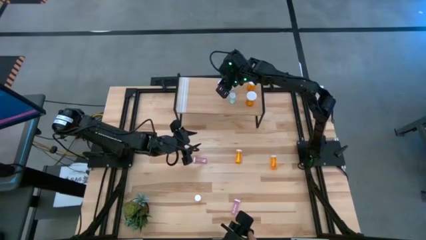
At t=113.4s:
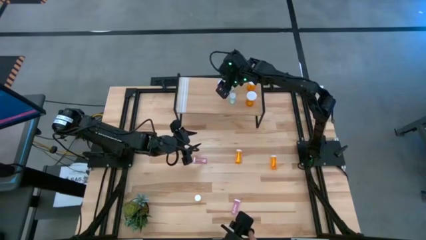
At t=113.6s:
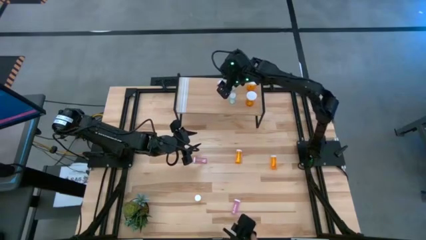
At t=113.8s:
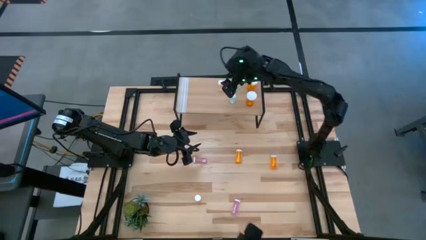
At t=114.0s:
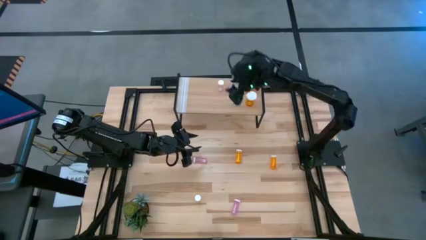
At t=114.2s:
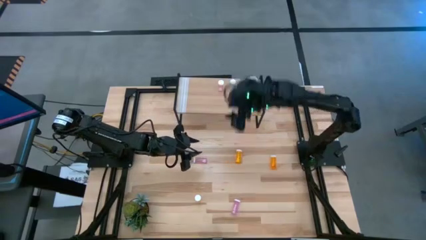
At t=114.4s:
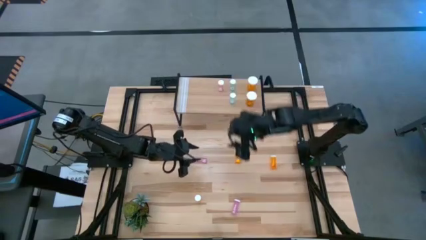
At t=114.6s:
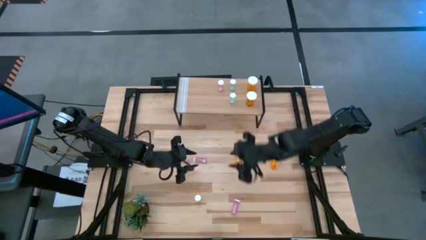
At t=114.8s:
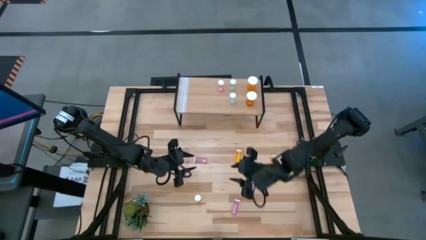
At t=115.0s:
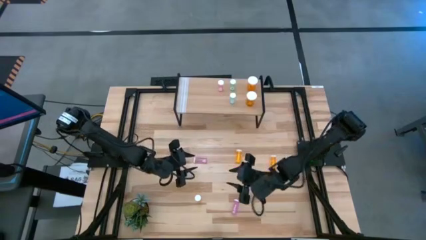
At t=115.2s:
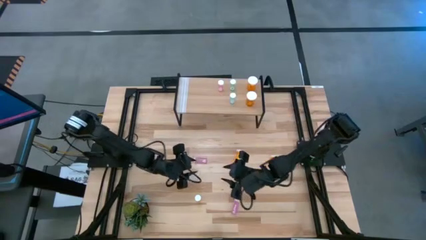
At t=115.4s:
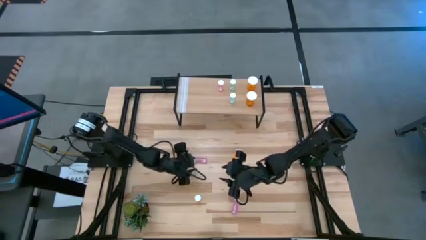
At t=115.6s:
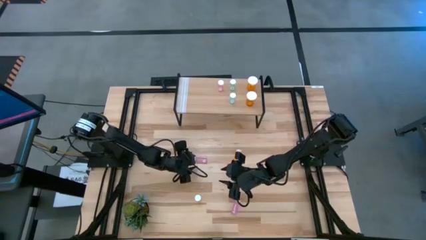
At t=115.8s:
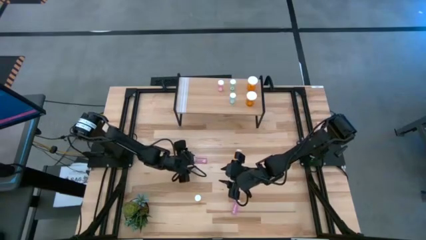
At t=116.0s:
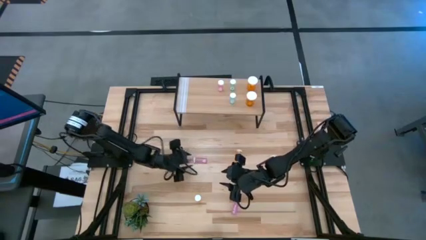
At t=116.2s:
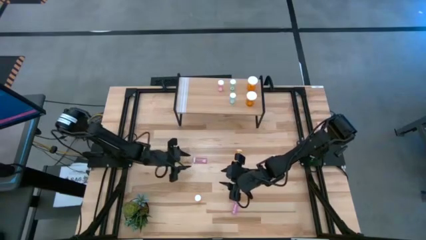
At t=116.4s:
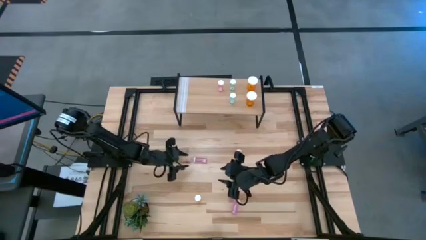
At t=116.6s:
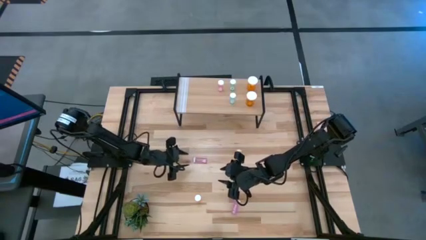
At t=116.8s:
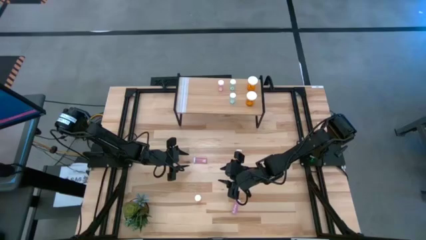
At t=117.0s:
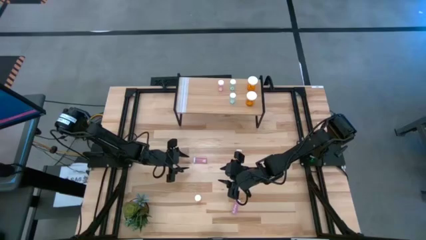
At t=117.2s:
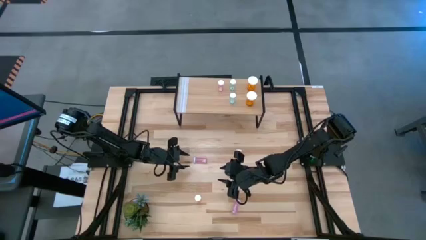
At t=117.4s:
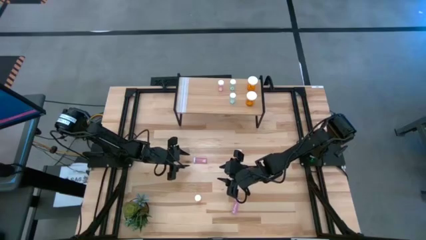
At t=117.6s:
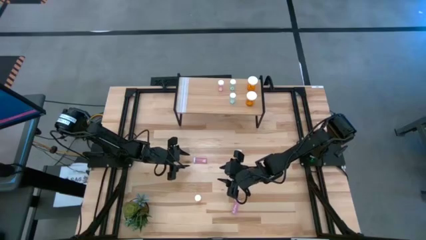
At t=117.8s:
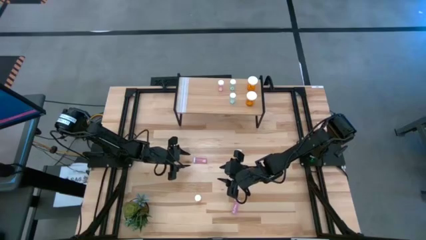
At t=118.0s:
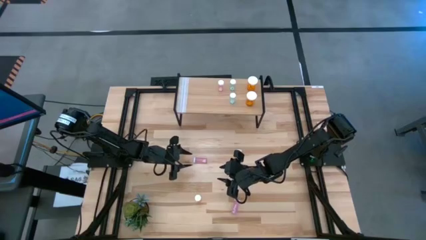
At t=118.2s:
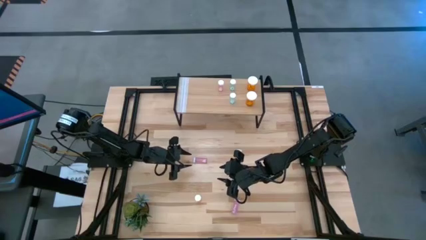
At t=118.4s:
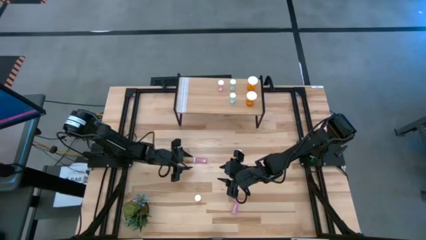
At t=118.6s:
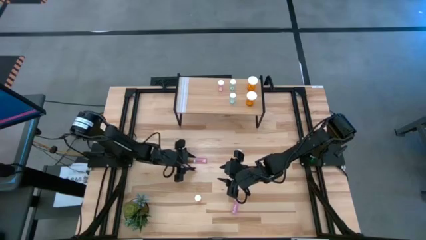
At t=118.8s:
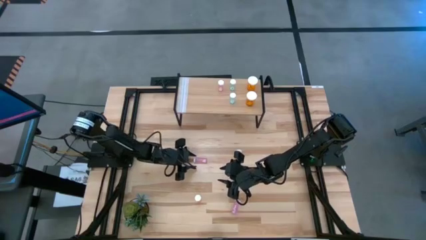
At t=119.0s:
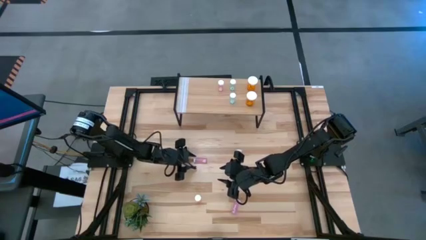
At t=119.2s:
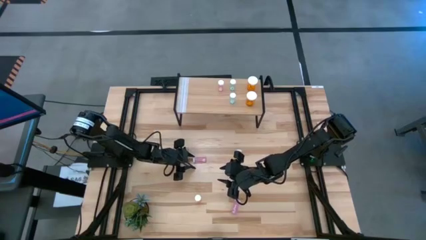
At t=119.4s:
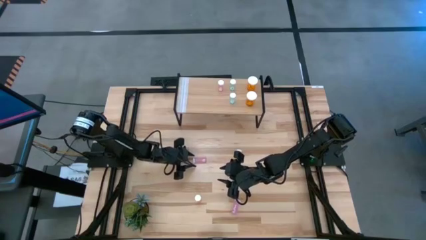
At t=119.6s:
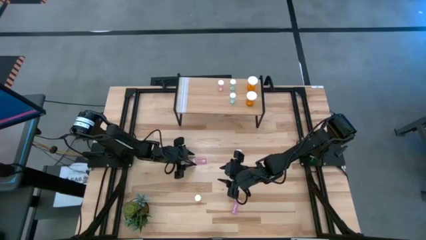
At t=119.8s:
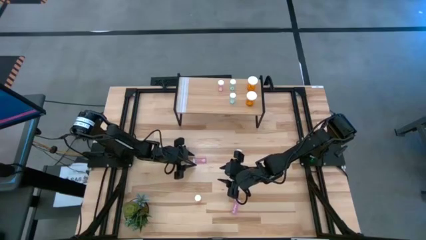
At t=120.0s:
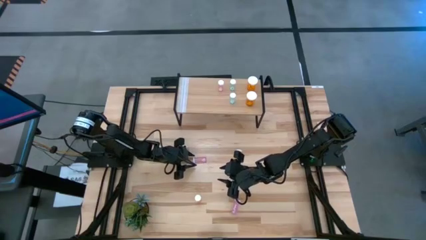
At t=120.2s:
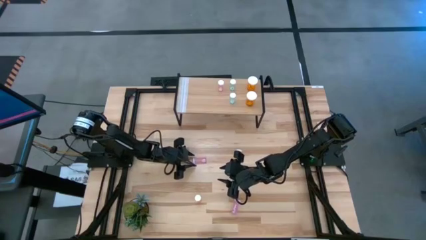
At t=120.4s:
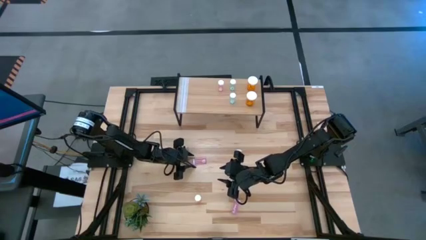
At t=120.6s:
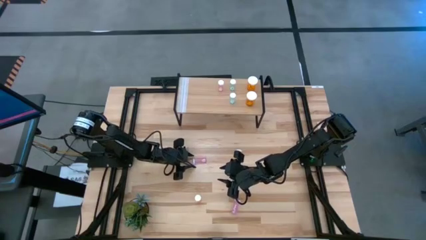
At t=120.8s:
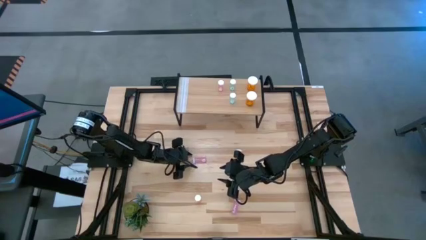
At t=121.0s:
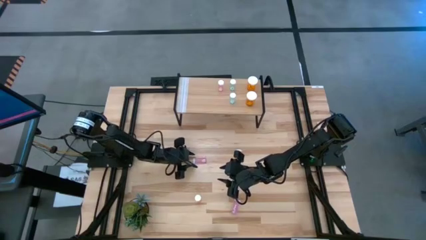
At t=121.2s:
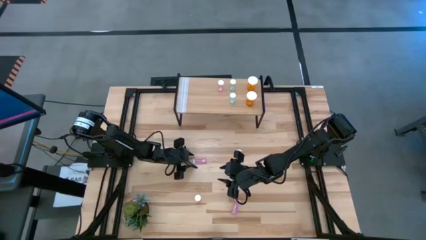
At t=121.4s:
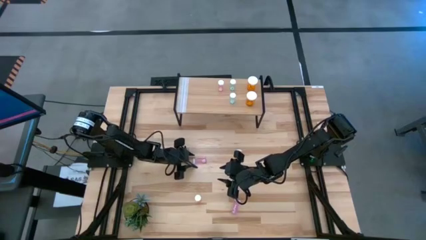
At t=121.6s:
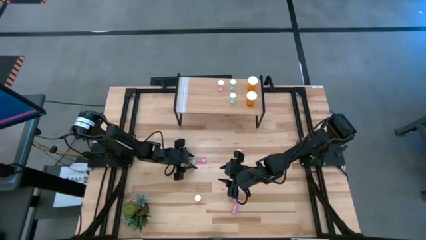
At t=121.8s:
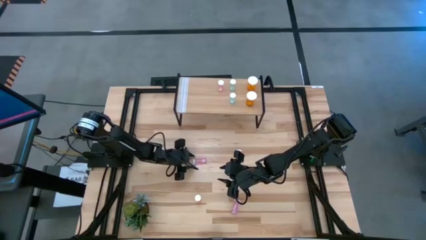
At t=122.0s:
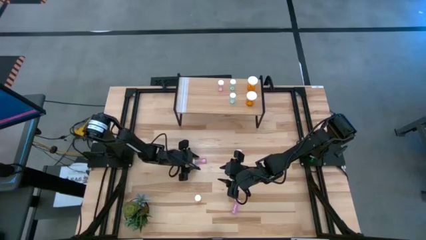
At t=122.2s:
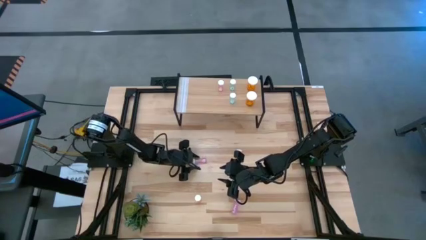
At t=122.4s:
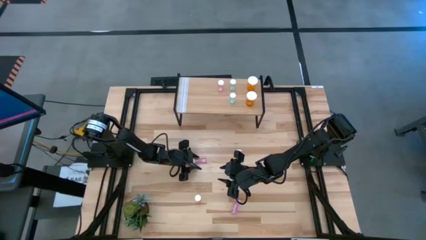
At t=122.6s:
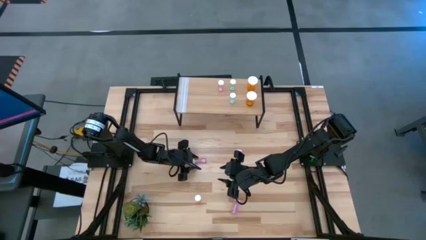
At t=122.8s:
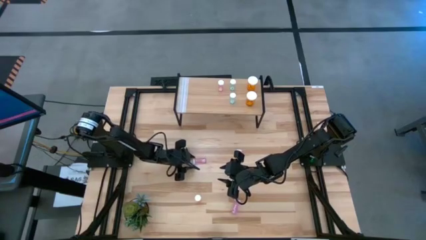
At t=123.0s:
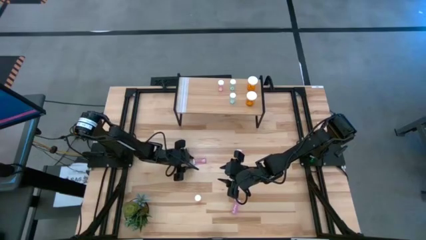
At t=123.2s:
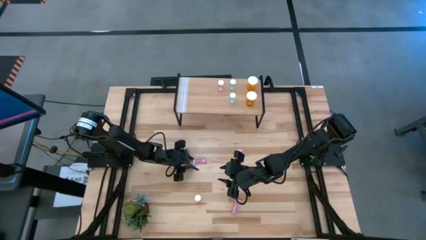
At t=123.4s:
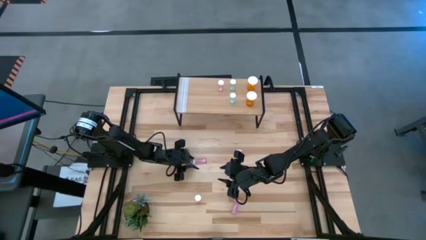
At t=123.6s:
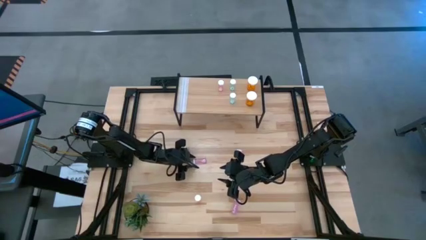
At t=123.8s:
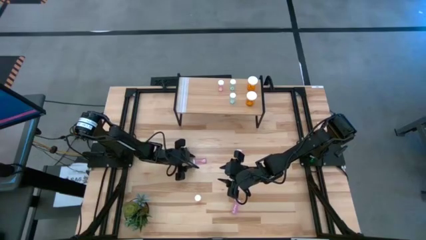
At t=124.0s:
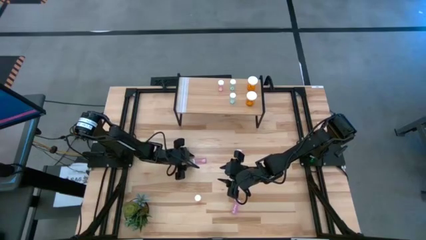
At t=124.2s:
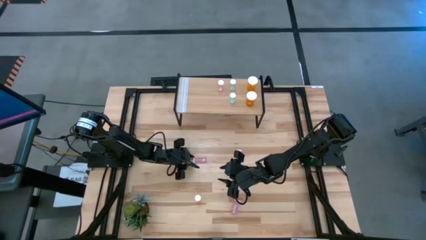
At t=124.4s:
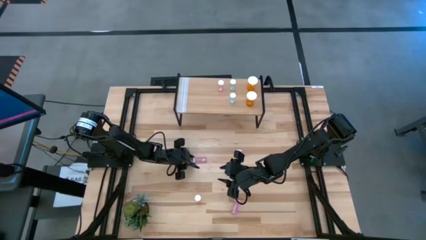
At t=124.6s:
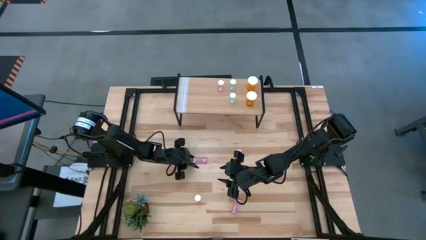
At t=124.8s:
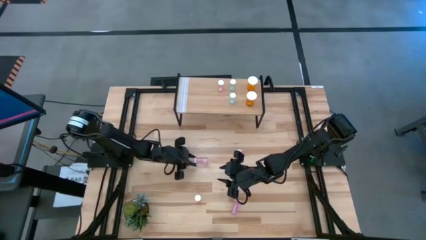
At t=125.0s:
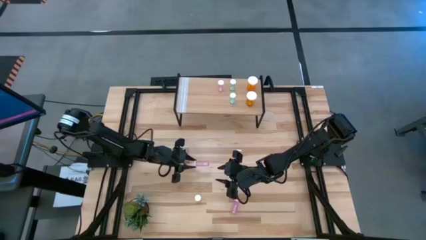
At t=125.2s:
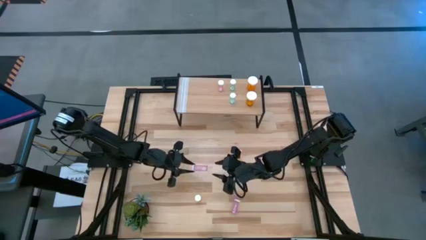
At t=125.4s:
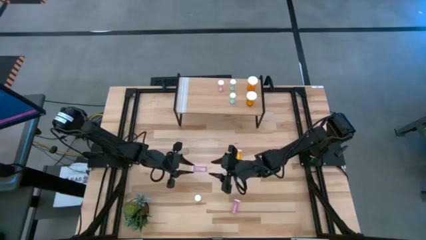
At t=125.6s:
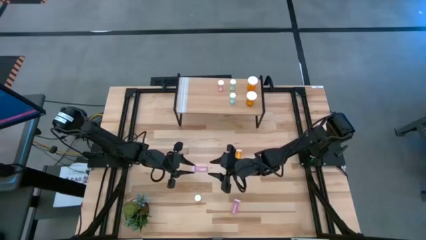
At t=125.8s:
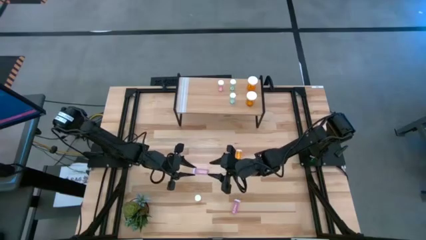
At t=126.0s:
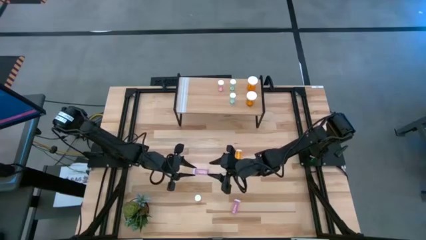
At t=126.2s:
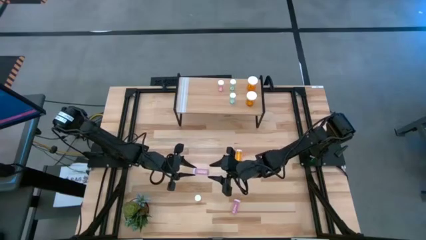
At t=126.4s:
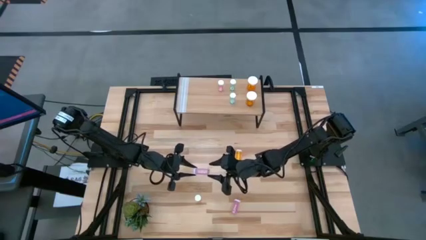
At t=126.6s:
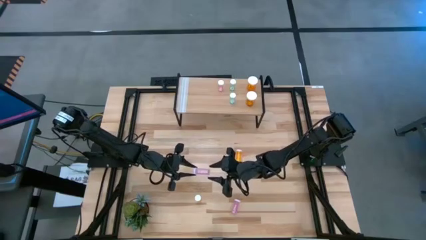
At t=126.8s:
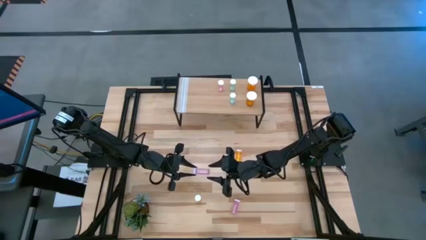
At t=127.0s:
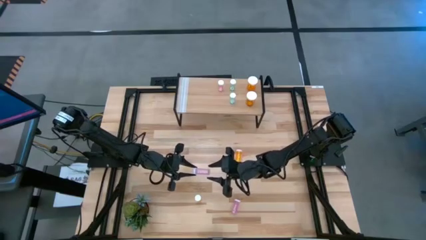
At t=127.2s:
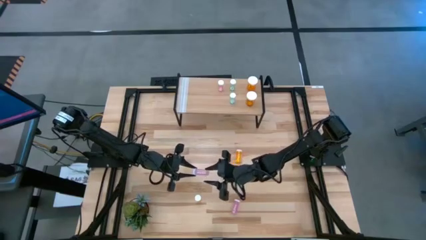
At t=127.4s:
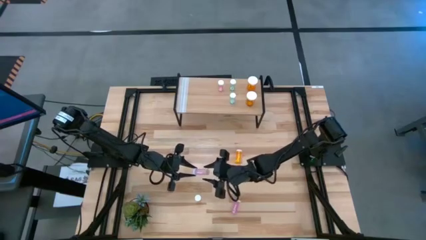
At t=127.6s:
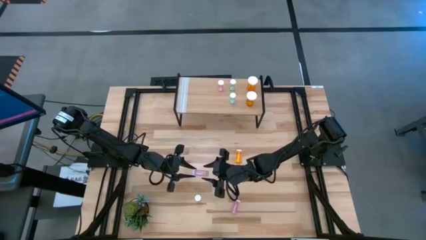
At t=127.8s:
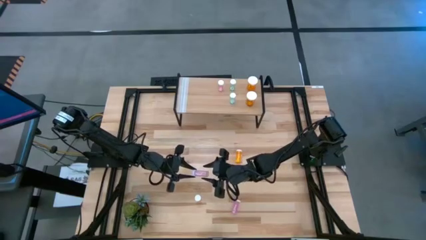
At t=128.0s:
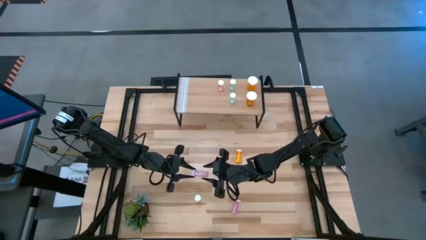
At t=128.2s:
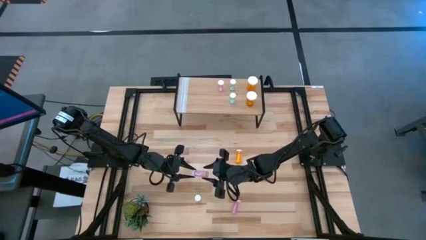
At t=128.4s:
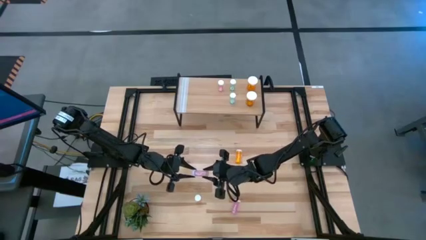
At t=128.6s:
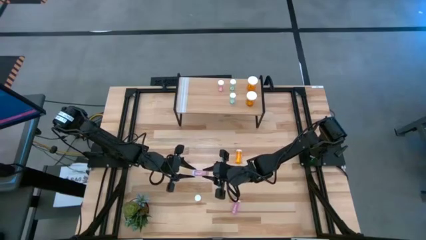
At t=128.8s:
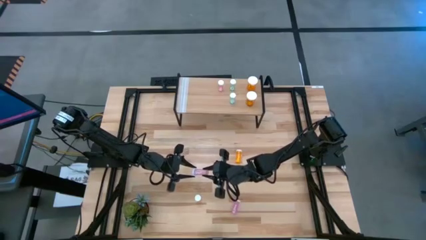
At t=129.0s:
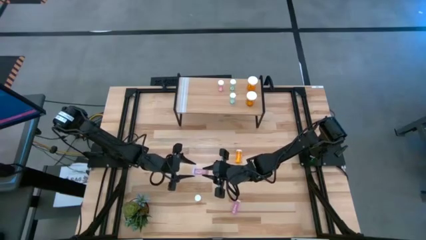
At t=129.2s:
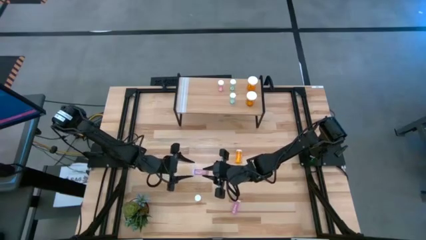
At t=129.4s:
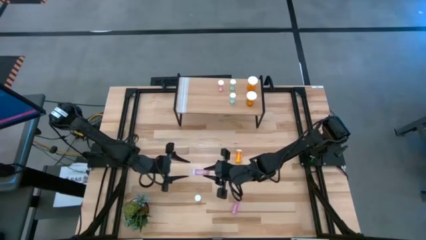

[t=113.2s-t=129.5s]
Task: Pick and place medicine bottles onto shelf by color
Put the top small pink pill bottle on the shelf aligned with the other small pink pill bottle
